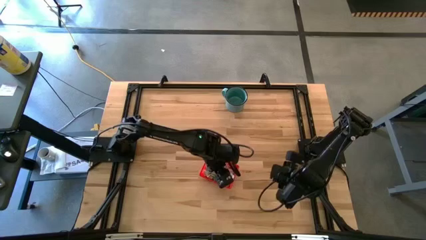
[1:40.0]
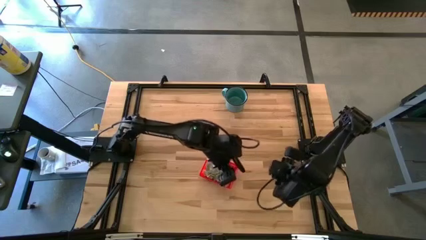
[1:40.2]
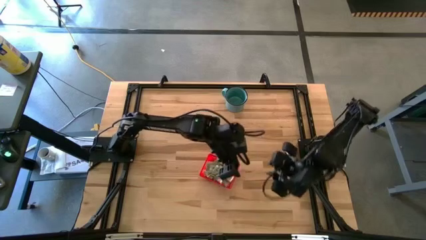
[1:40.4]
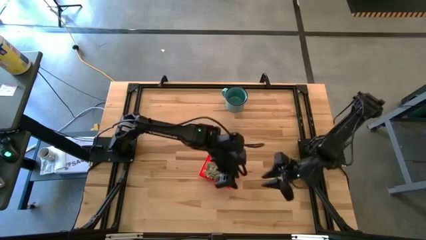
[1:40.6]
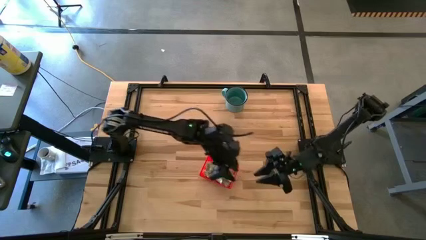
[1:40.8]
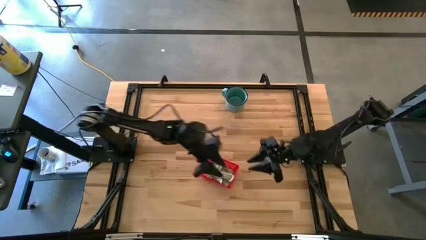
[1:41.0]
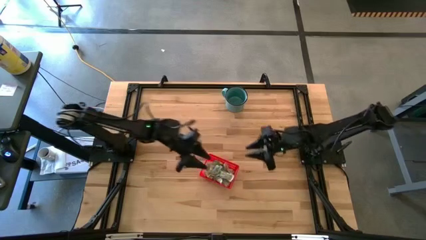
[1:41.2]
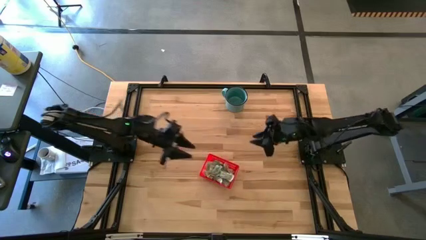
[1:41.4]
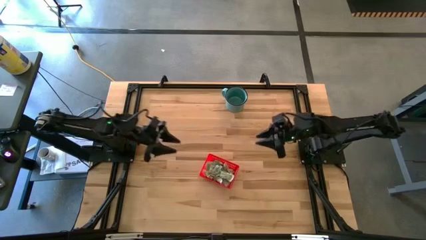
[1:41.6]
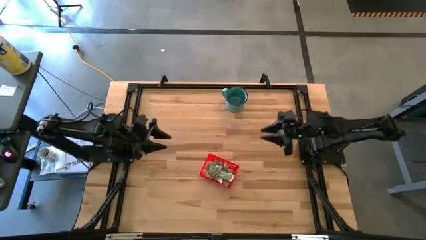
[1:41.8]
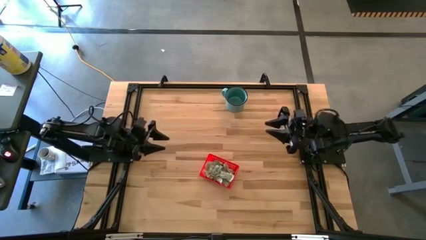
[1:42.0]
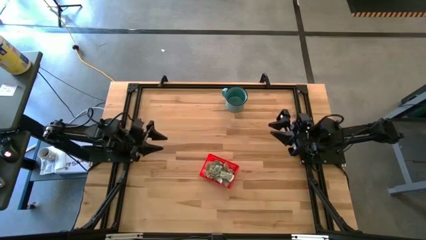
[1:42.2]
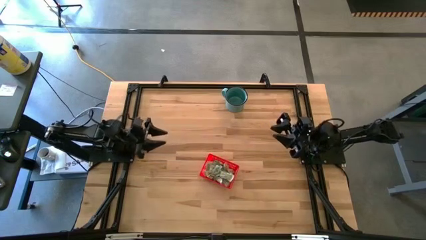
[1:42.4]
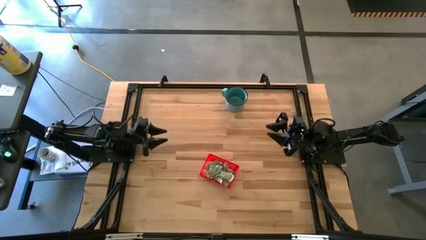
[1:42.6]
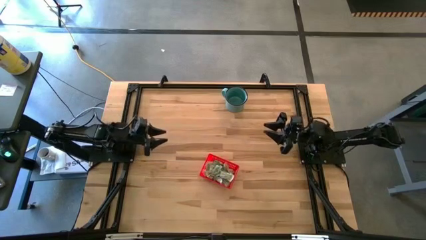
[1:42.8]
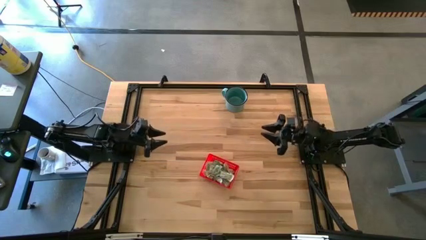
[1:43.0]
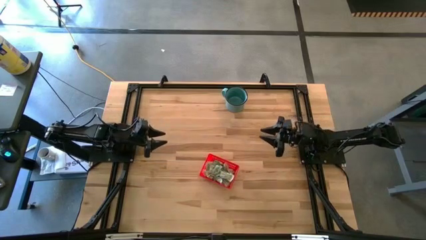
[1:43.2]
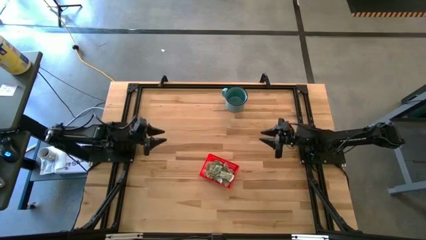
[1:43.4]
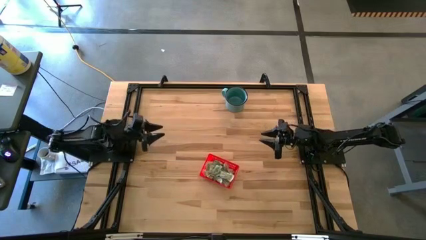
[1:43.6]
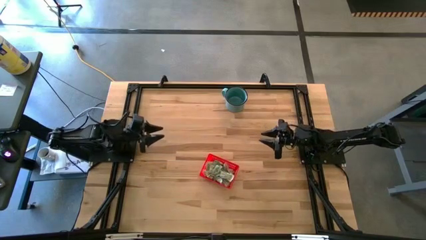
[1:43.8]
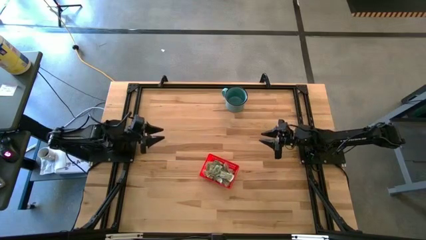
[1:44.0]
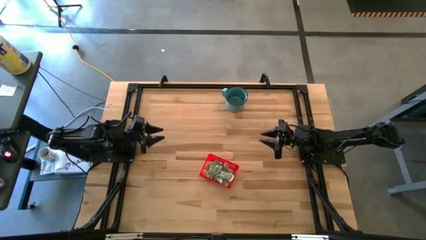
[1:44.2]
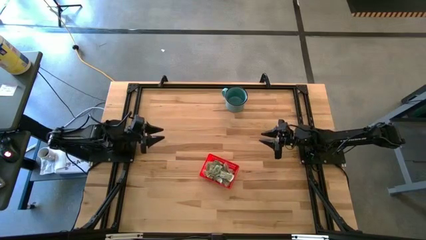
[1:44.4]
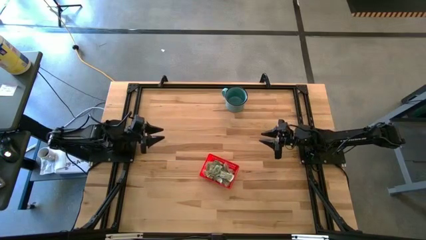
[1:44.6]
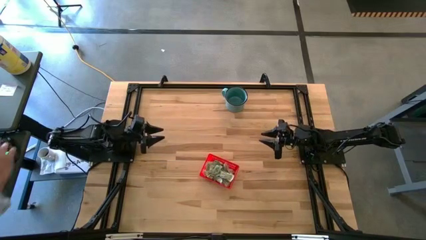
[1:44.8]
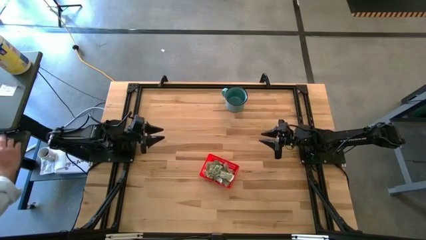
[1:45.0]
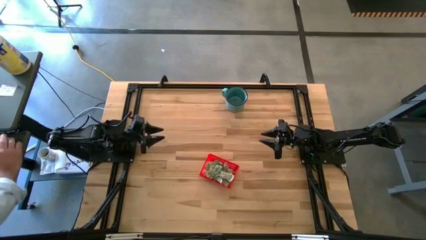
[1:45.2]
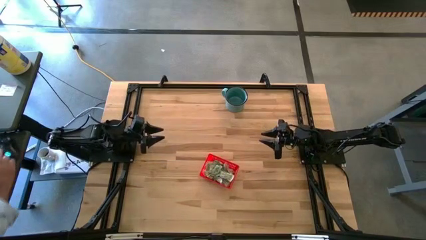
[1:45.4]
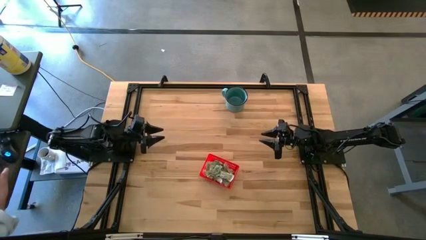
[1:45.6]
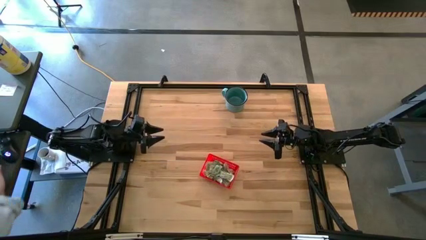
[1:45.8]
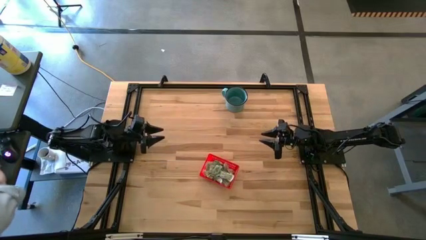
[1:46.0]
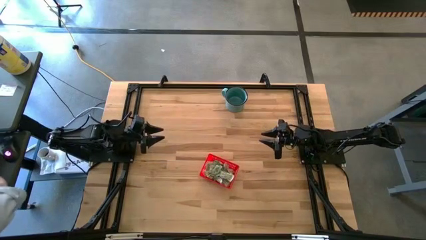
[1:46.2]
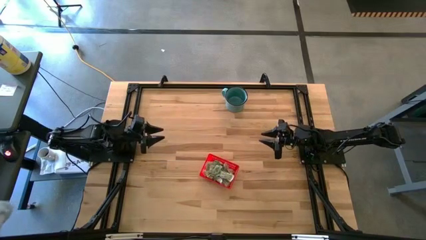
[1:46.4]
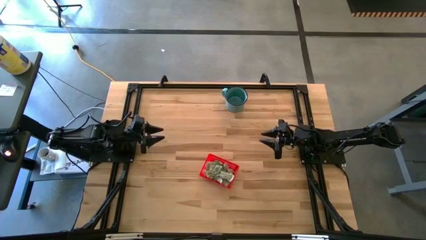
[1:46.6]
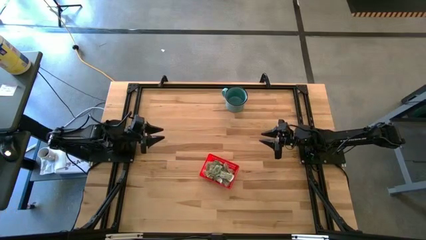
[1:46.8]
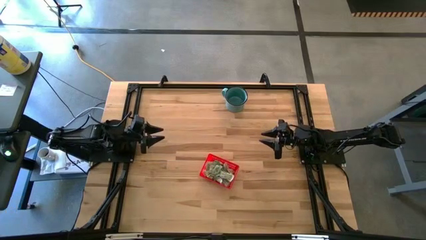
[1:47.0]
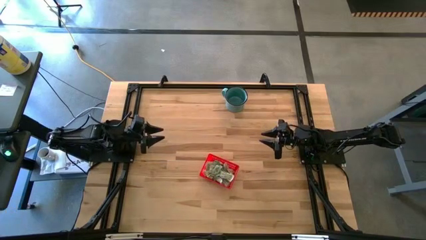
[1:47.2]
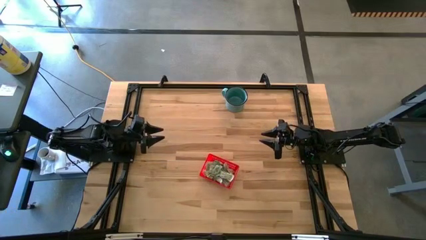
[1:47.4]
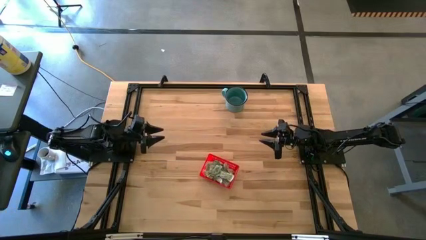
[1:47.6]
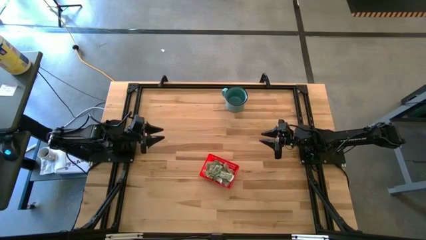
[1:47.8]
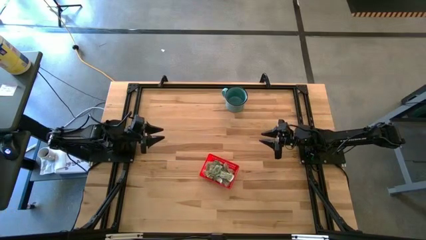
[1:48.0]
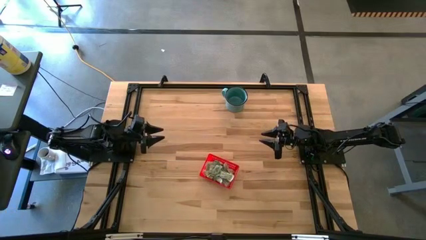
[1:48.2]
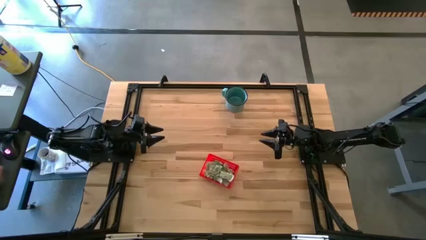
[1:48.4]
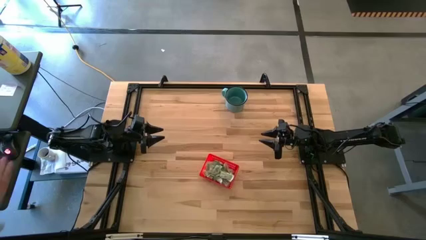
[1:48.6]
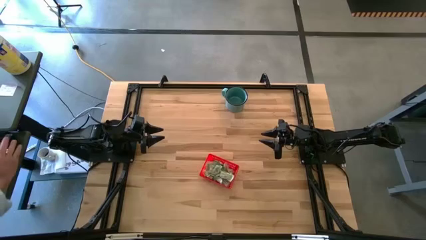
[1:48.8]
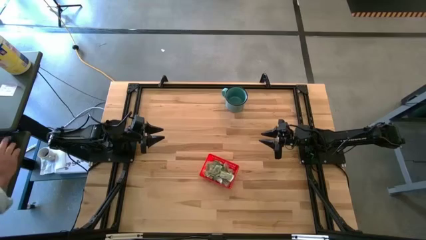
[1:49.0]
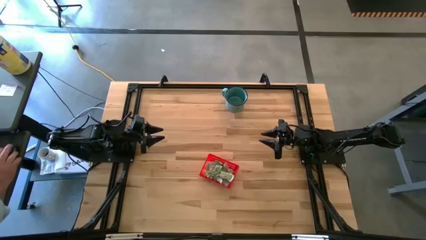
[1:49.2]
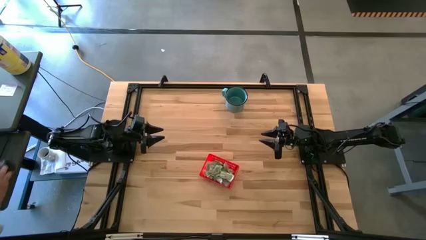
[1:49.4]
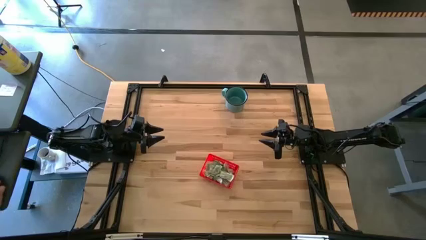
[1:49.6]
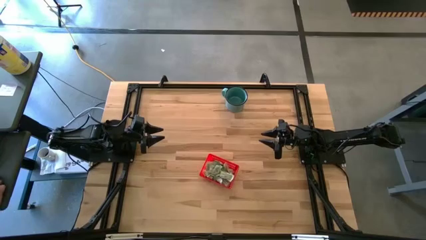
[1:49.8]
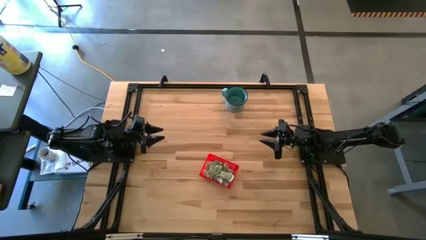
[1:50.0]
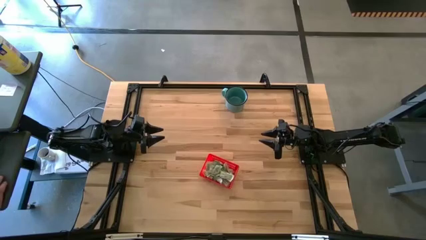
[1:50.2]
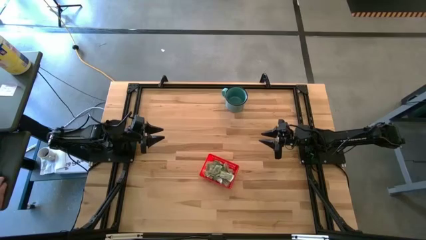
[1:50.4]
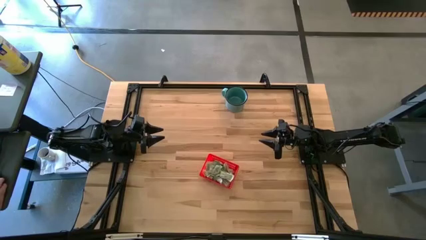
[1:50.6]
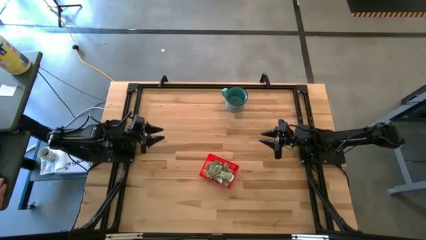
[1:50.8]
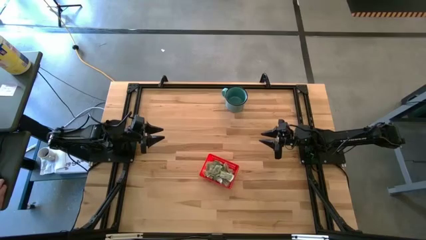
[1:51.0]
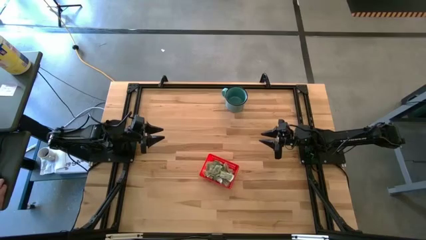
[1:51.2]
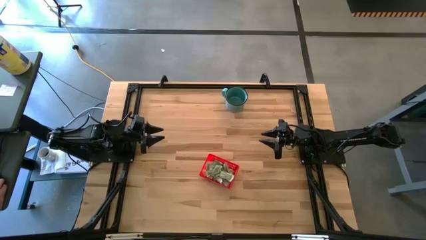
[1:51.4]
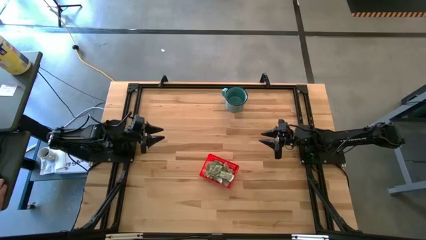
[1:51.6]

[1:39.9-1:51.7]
Task: Pick and place Stevia / Truvia into bins
Return to Home Position

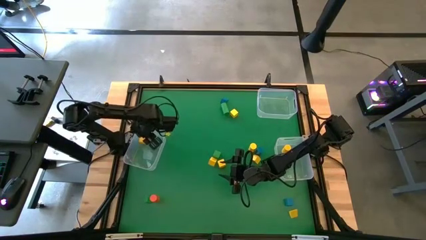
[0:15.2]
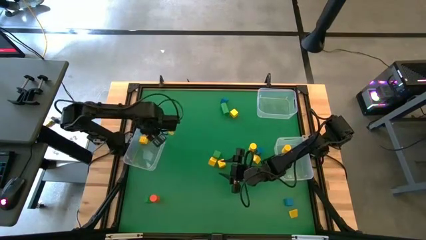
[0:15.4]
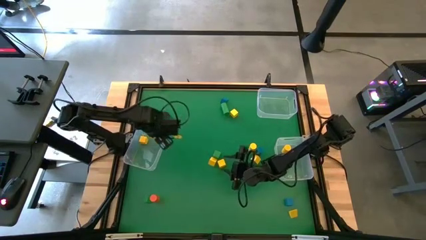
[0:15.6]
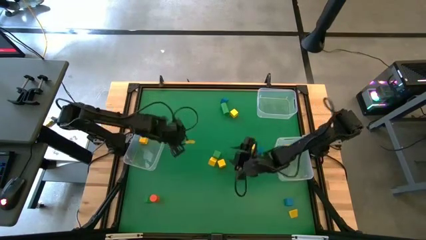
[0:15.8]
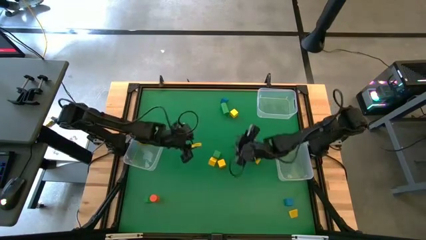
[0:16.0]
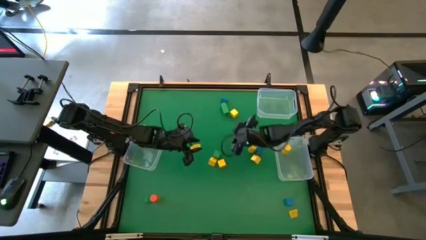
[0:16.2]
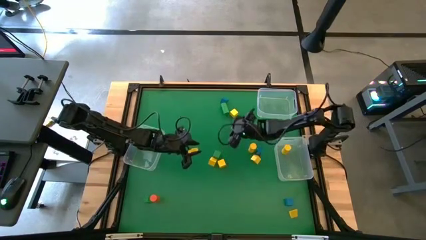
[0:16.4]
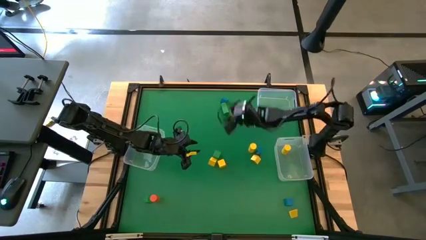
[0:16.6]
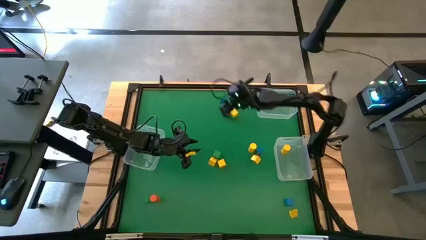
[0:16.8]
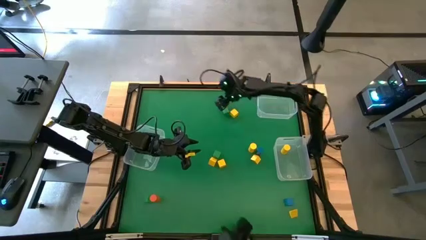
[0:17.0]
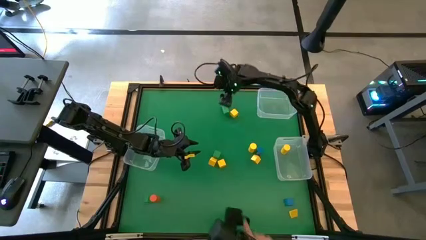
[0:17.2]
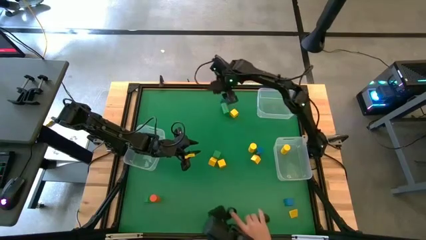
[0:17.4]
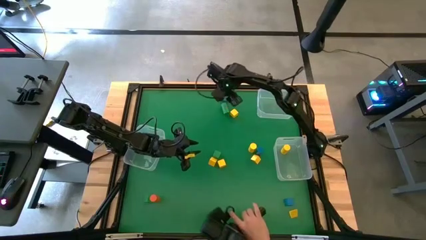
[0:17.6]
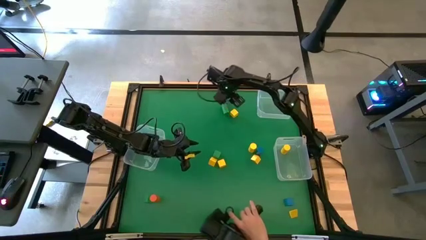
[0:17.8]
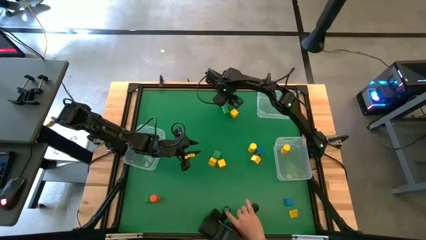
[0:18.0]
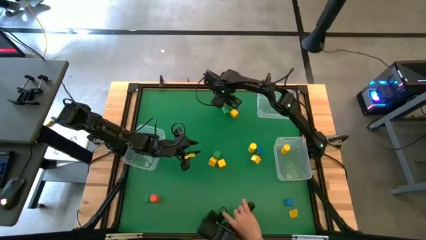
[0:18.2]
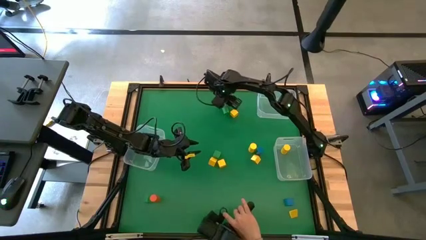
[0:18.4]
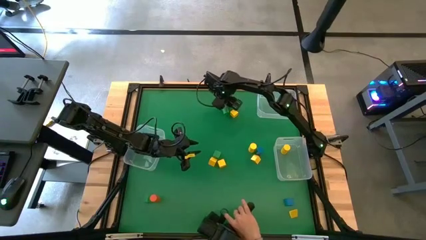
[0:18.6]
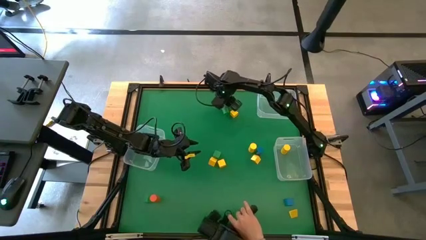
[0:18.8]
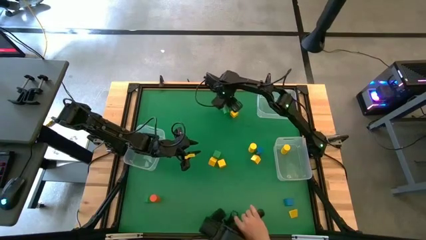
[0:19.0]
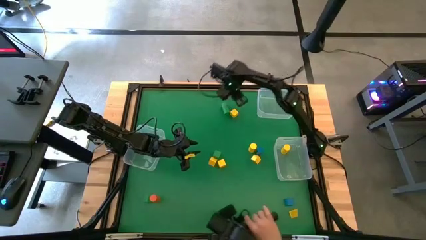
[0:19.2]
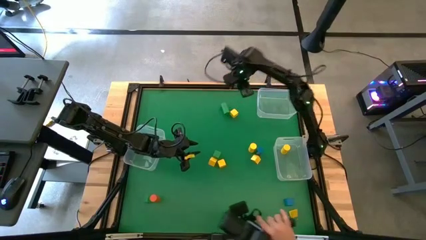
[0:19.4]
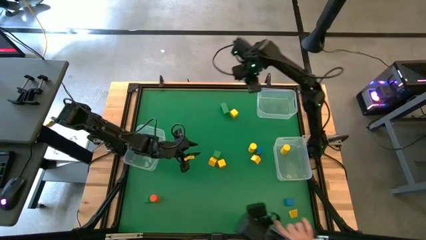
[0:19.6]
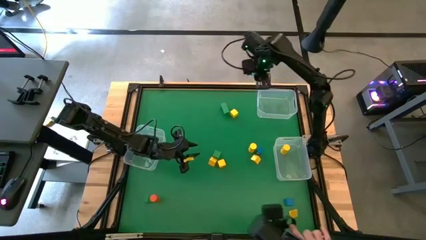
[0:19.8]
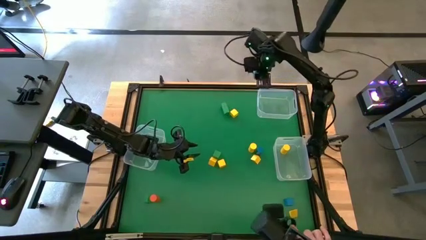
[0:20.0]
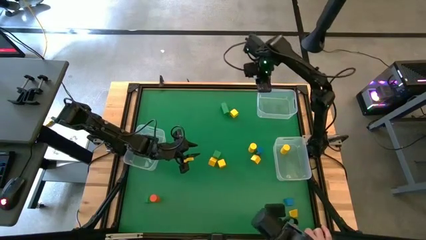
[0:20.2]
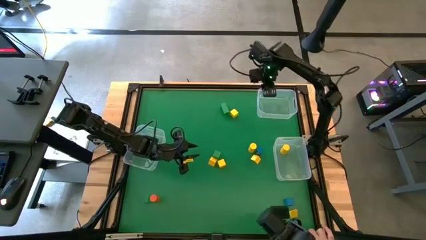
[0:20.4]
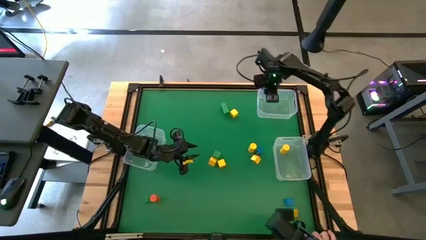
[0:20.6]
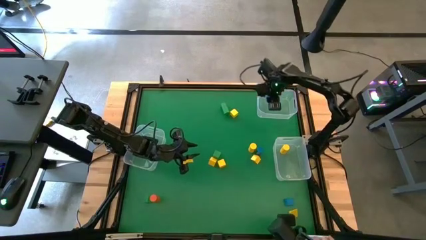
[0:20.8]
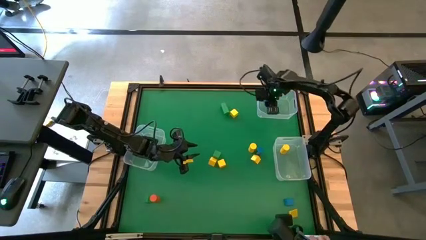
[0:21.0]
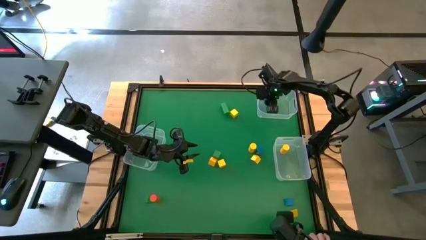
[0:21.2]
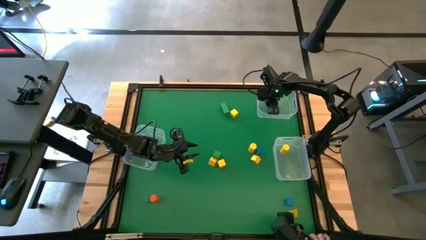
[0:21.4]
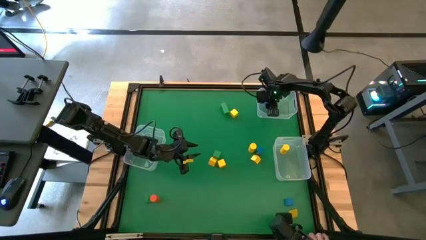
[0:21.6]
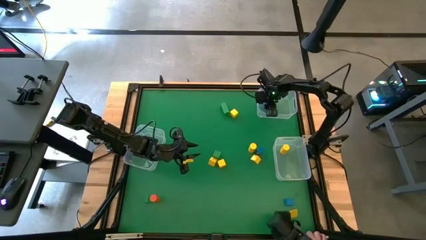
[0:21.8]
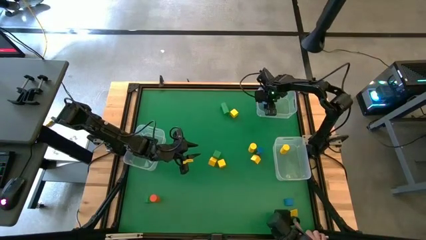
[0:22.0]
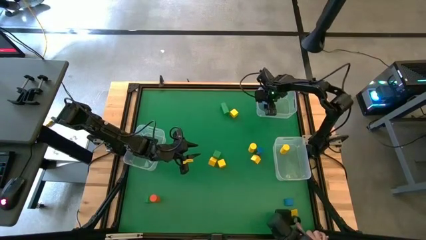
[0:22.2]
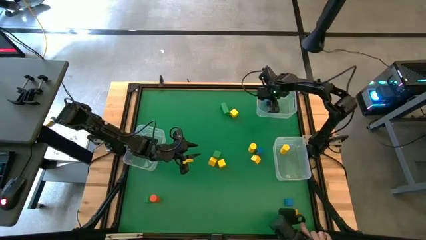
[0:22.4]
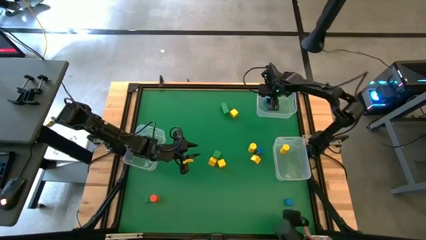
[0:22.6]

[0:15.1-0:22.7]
Task: Sort blocks by size
Put the blue triangle block into the top transparent bin
